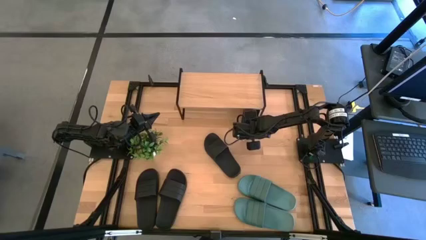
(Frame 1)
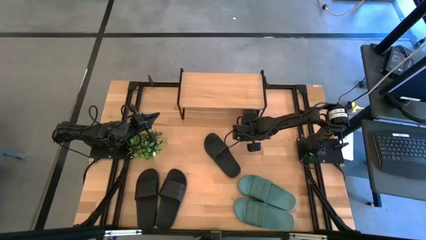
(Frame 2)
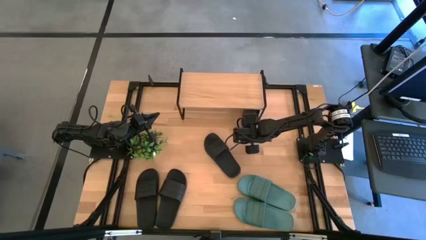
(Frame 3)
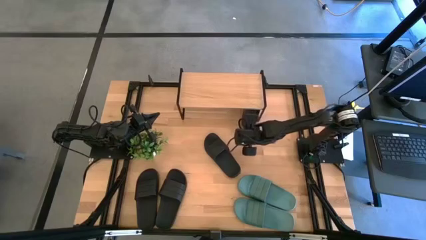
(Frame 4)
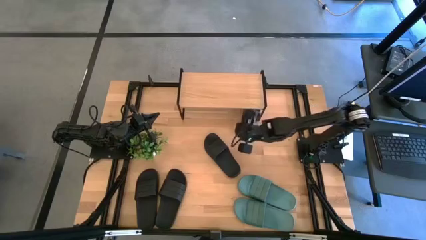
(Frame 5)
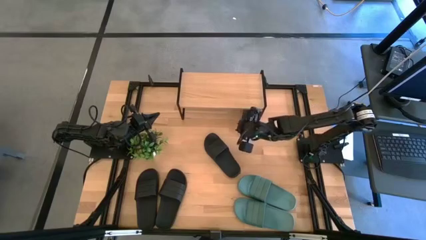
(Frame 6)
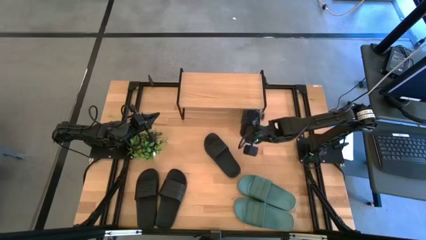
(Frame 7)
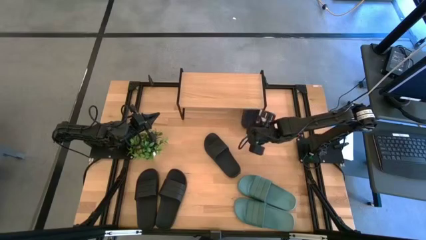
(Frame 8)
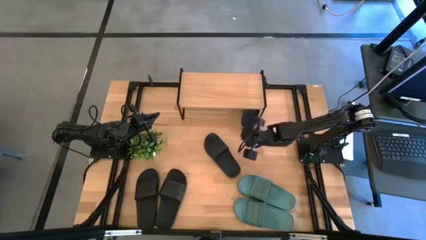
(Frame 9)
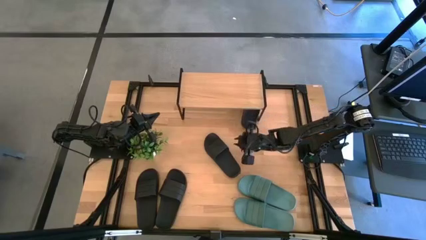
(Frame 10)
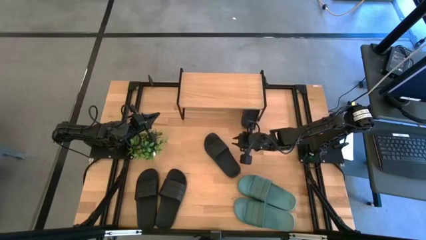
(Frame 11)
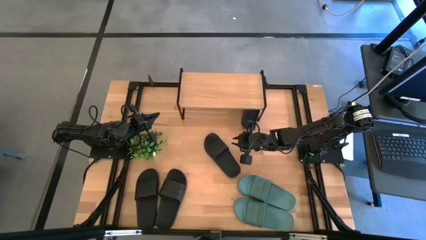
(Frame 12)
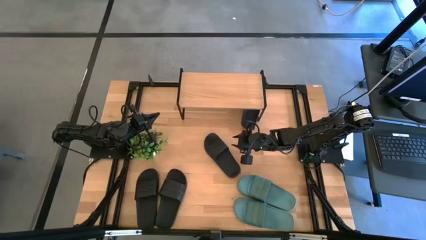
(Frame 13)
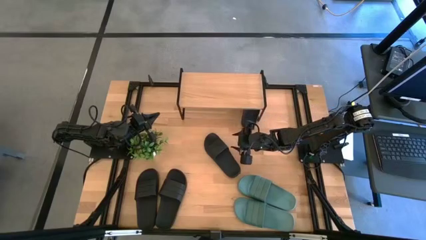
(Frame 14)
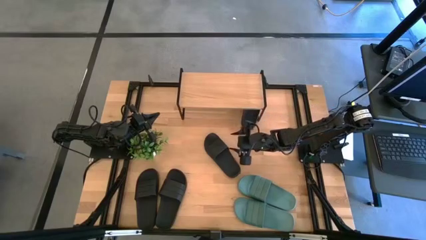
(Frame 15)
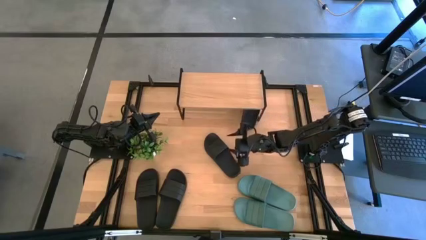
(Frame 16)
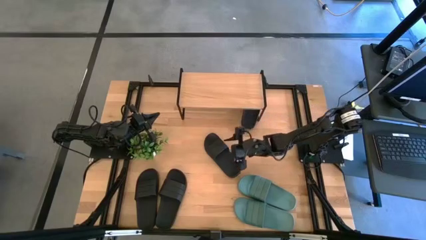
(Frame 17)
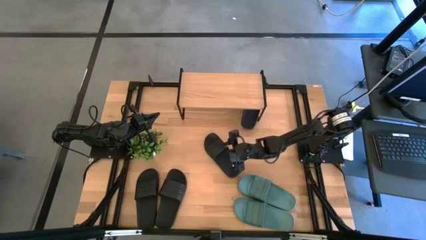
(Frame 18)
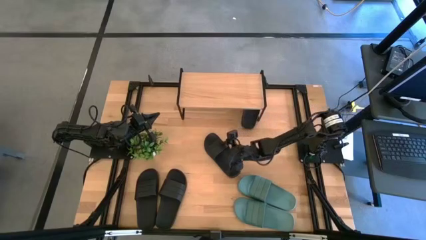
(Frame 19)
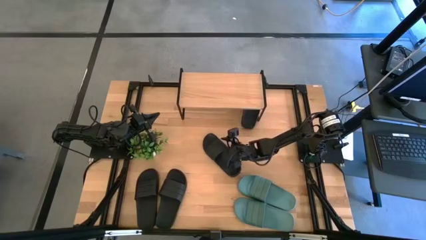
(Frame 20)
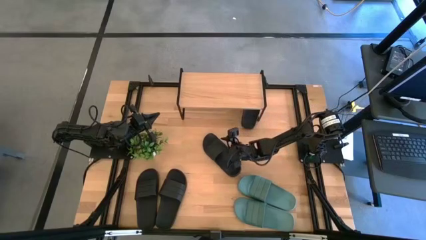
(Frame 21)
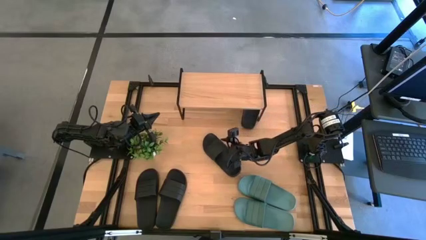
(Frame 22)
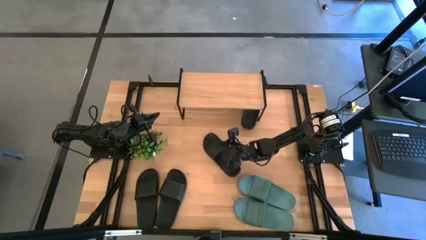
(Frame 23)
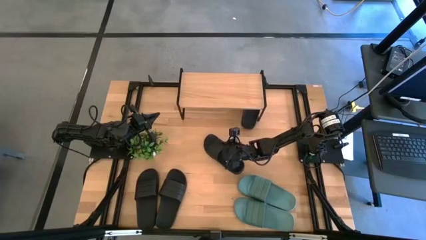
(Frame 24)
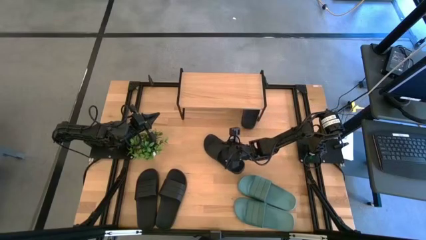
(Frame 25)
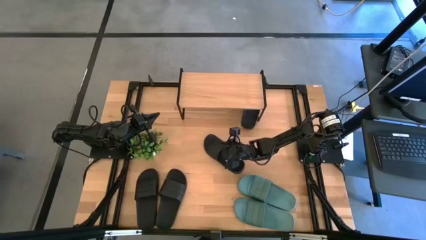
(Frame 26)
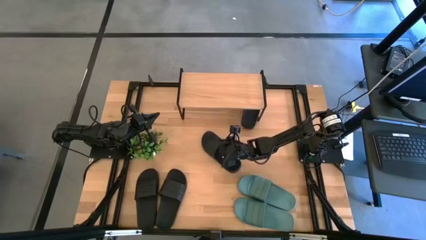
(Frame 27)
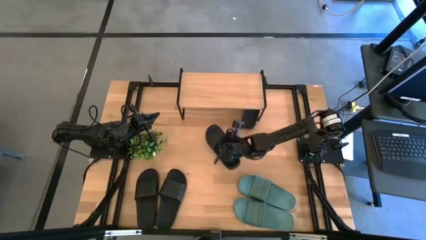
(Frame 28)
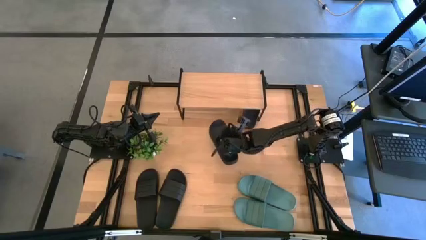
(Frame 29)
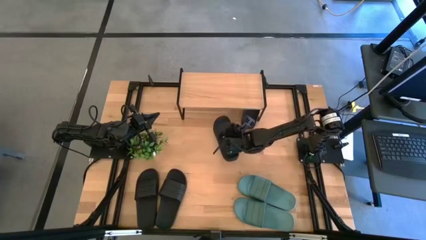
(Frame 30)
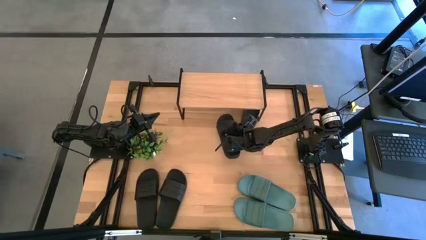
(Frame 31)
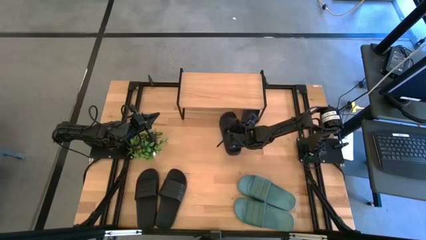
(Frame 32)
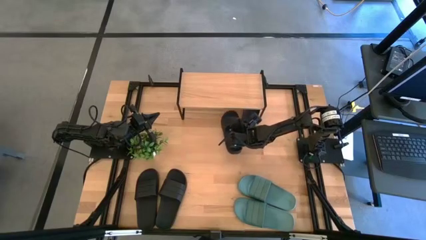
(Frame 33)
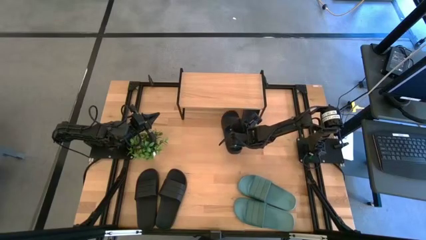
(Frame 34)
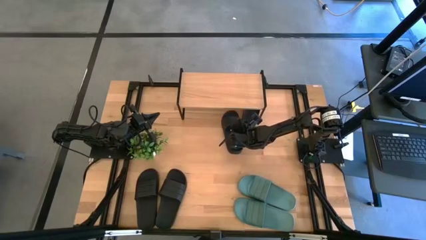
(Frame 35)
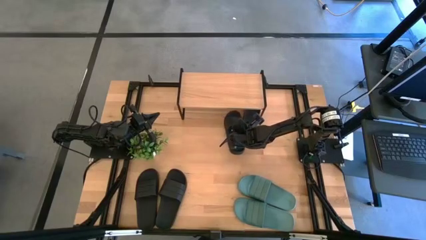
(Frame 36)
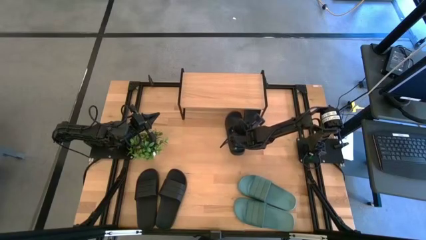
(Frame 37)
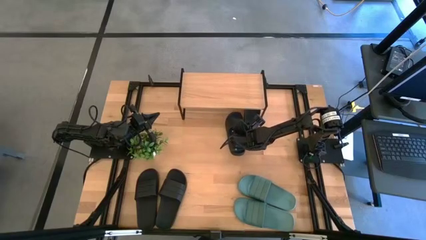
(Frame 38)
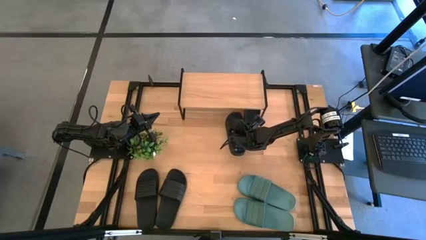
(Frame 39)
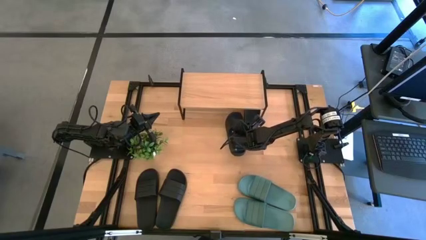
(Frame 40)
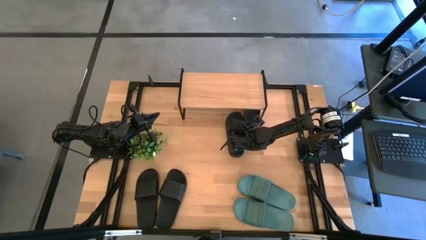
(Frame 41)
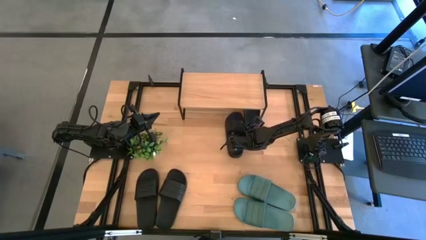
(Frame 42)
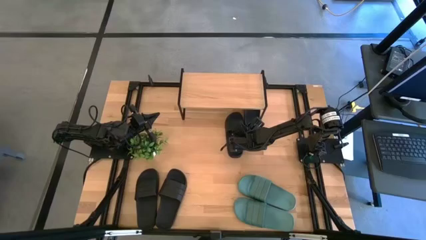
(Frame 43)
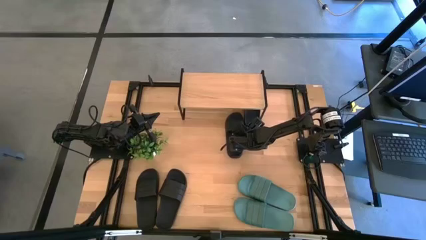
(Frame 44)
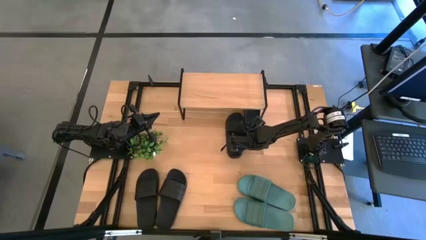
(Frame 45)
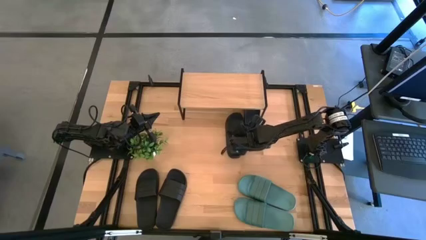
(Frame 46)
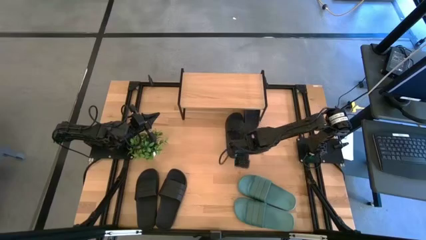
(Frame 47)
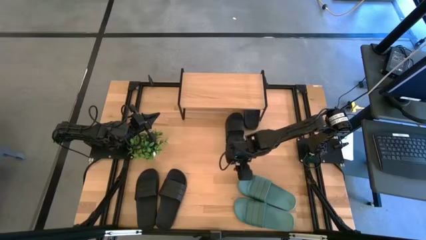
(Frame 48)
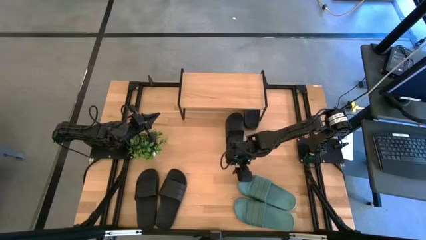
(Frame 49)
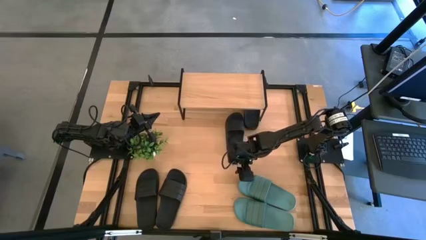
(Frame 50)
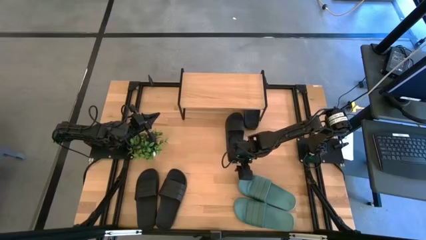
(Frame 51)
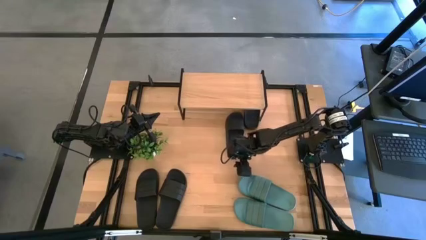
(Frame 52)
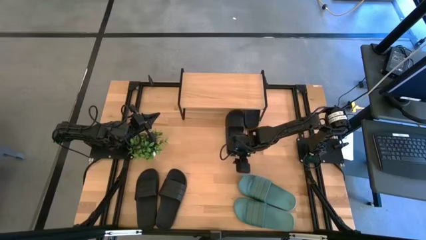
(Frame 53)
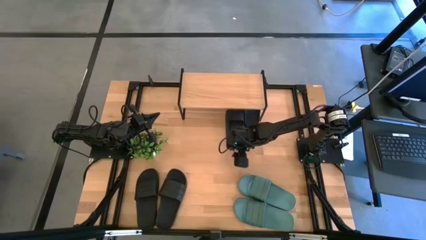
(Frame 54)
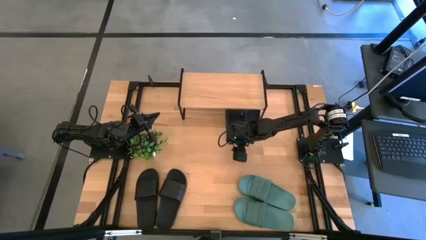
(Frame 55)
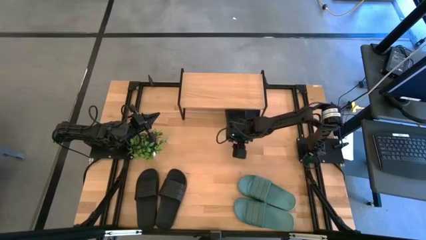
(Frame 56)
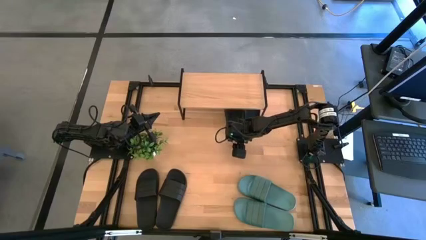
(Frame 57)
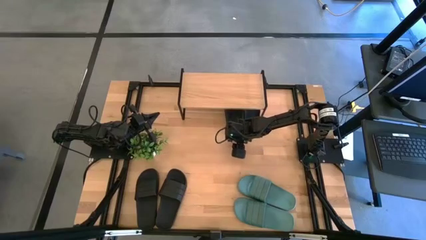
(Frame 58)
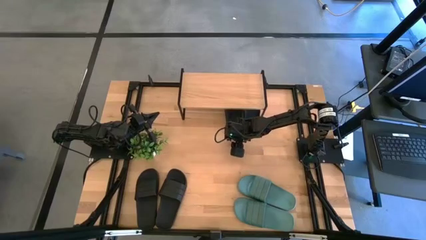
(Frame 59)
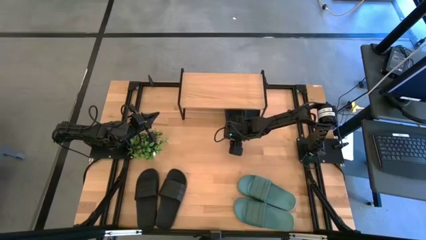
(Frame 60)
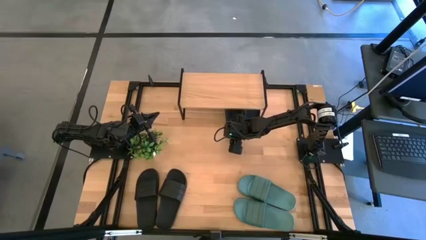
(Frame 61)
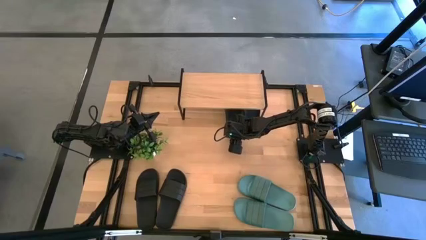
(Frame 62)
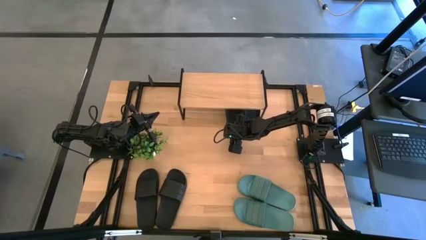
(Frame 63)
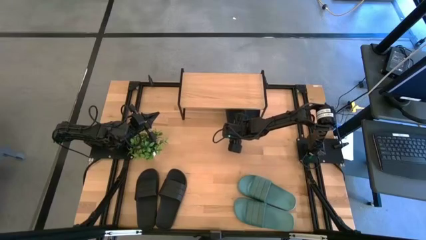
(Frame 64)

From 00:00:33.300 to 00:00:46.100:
Task: Pick and place slides into the shelf
Put the black slide under the shelf
